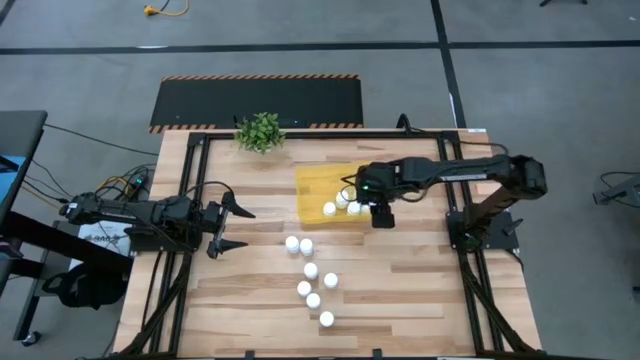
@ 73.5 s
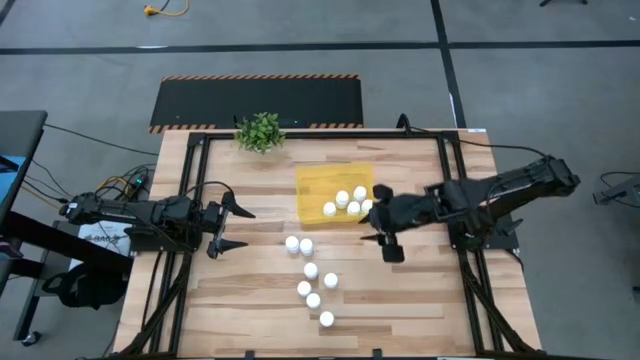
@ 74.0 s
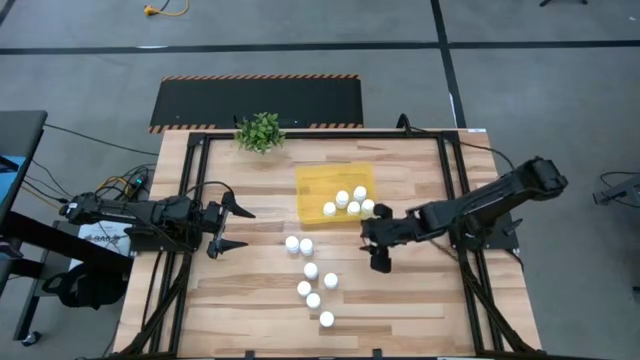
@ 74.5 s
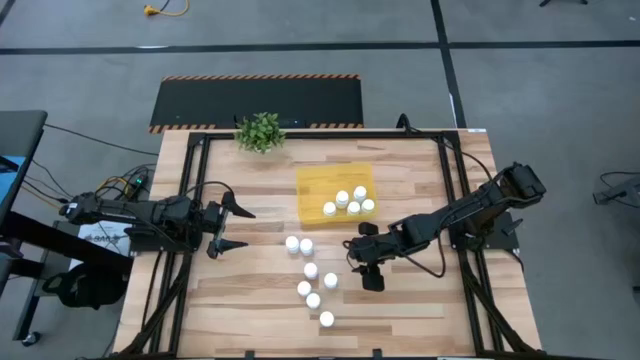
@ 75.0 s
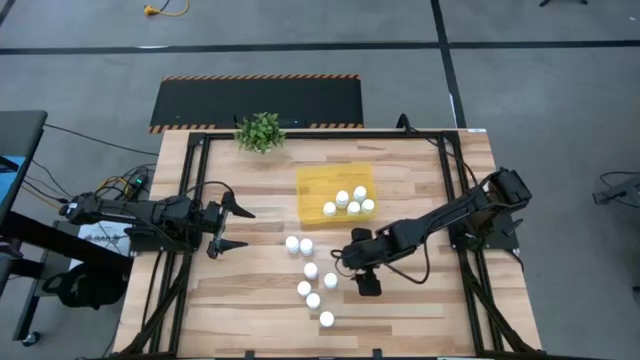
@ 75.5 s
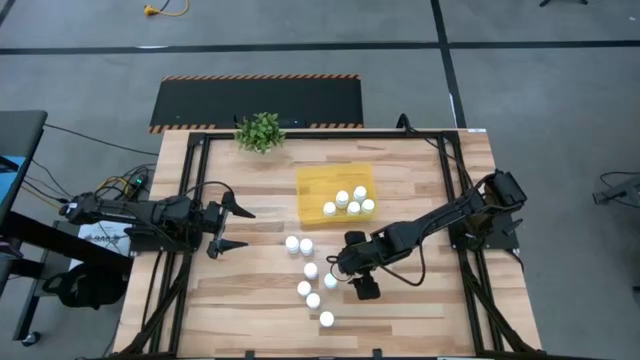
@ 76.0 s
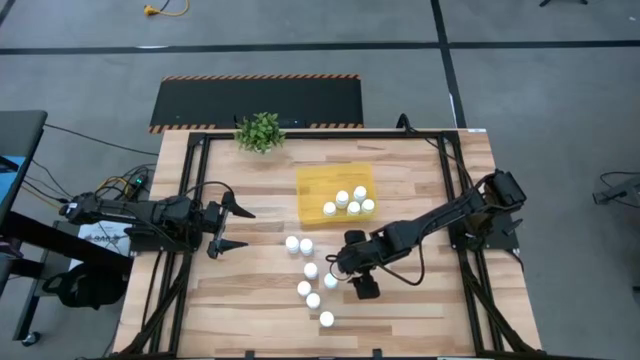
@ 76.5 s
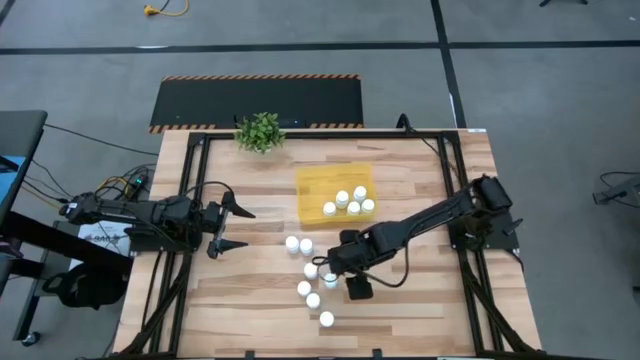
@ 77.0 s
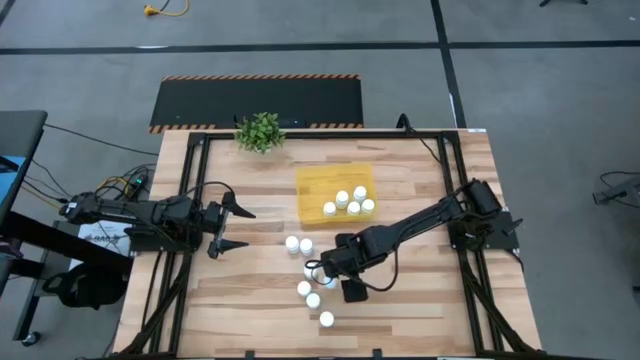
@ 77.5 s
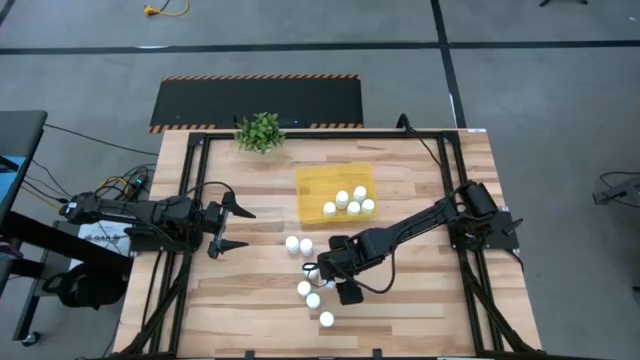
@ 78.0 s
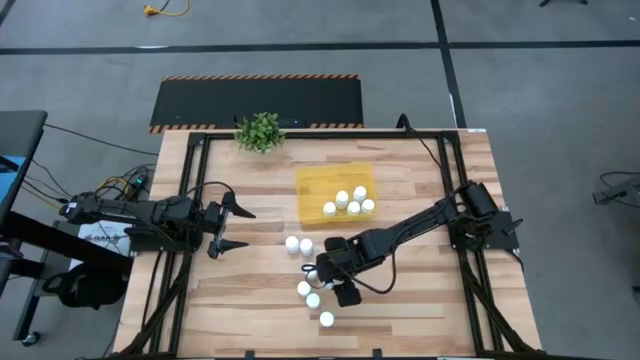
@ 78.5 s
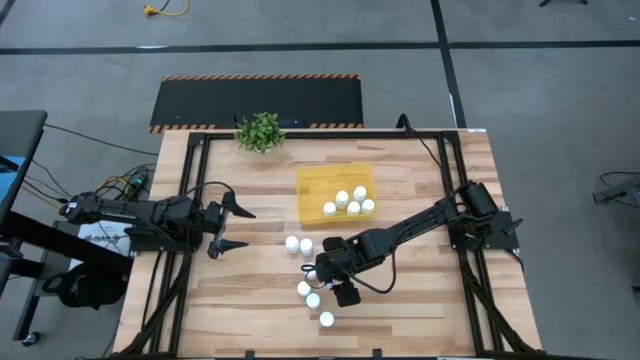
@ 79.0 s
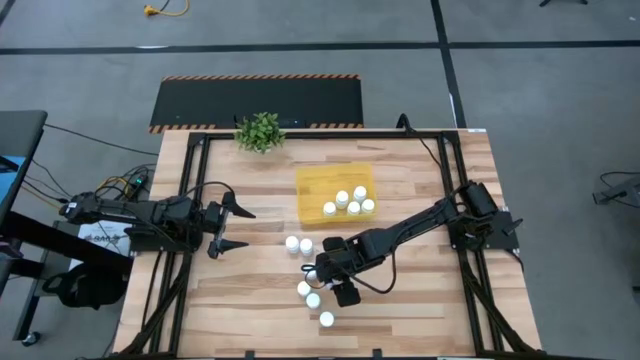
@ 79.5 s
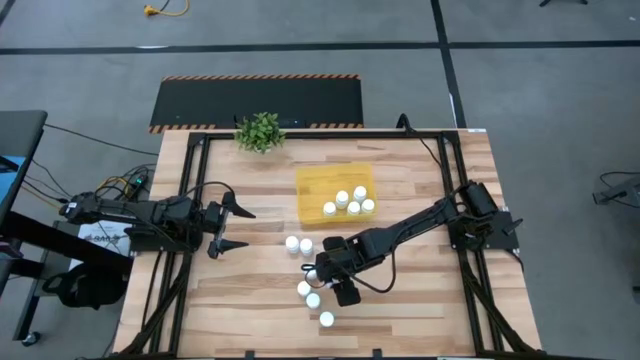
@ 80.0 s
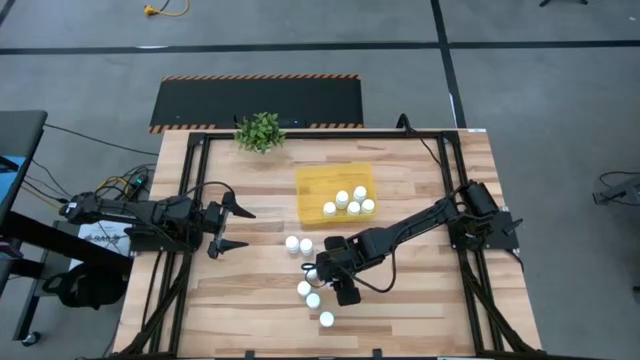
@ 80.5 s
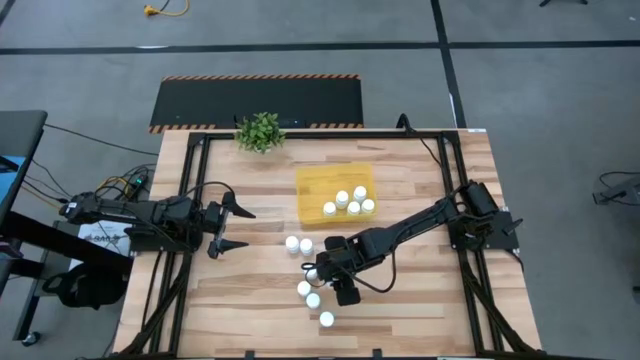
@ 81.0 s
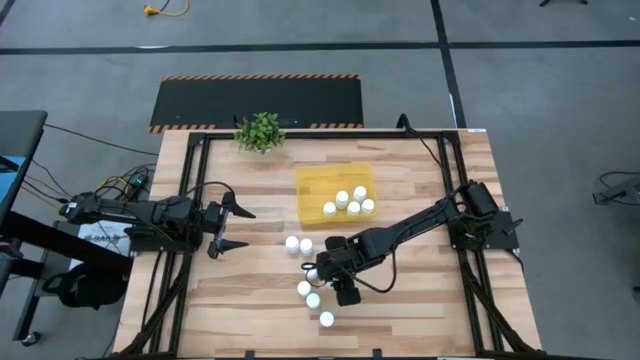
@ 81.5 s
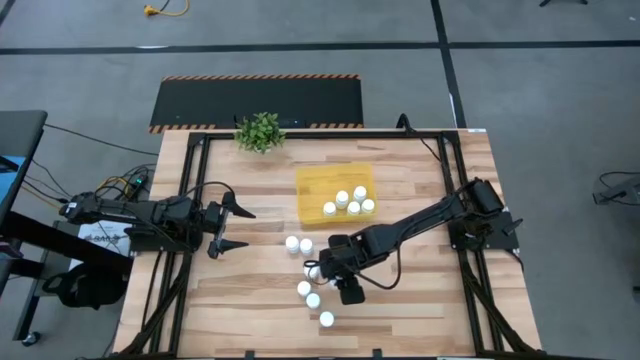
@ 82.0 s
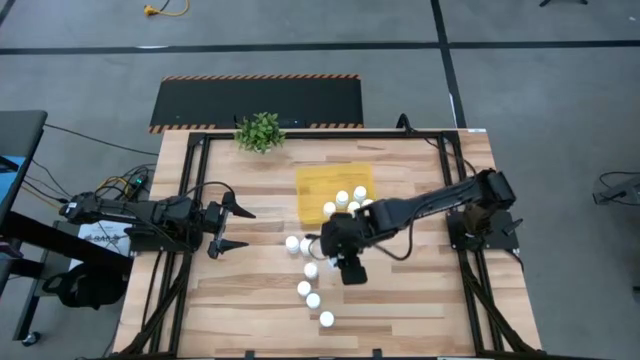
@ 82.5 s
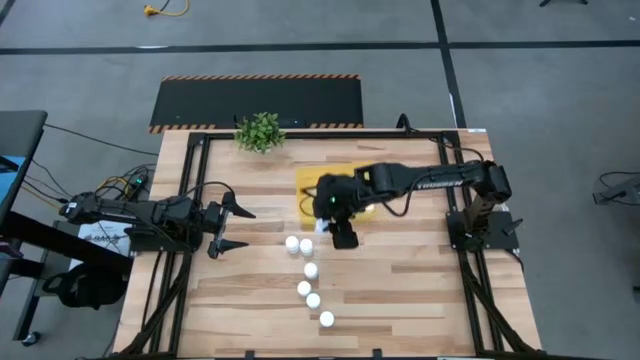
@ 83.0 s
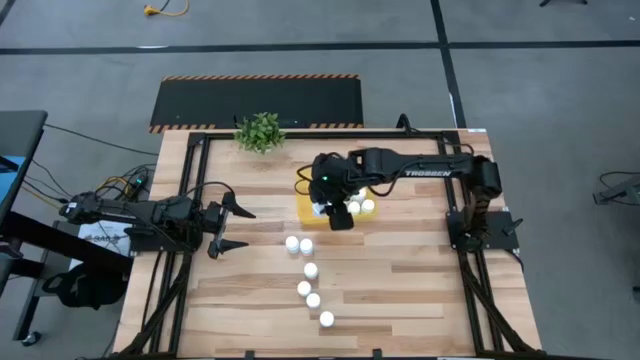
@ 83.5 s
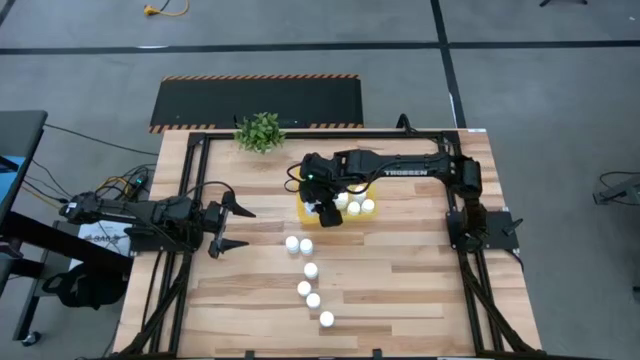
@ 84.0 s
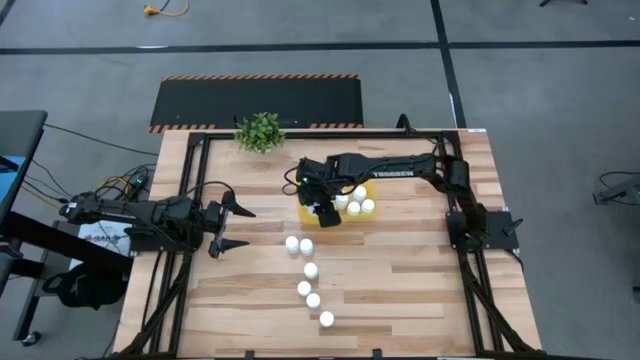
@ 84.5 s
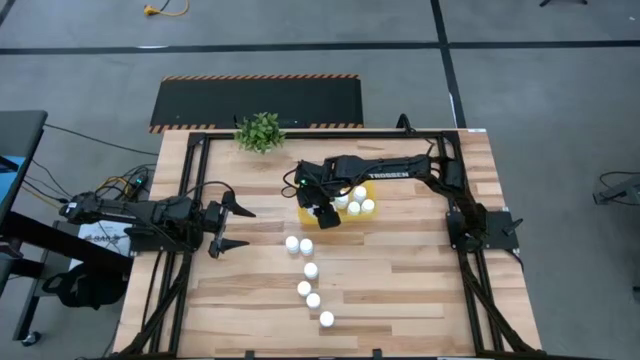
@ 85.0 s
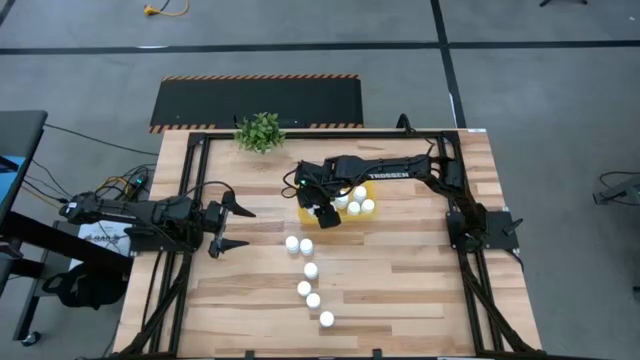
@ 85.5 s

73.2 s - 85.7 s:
Task: Pick and place pill bottles into a basket
Put the white medicine bottle into the yellow bin

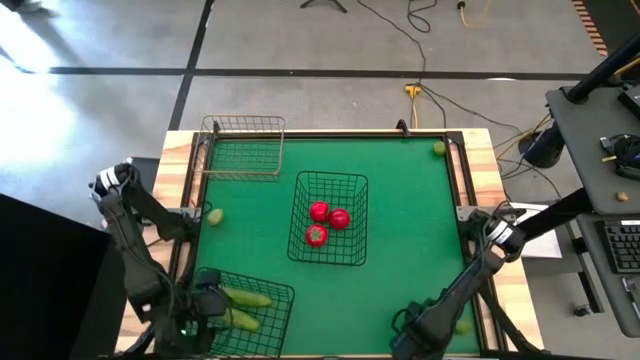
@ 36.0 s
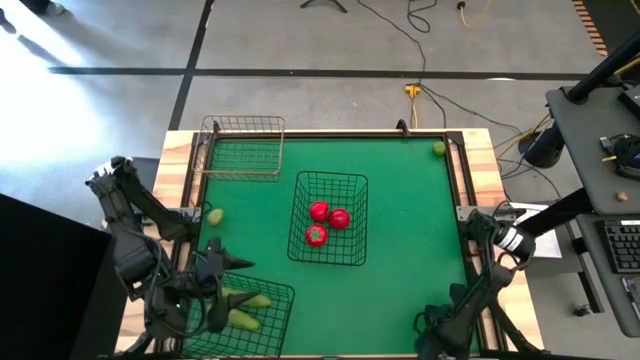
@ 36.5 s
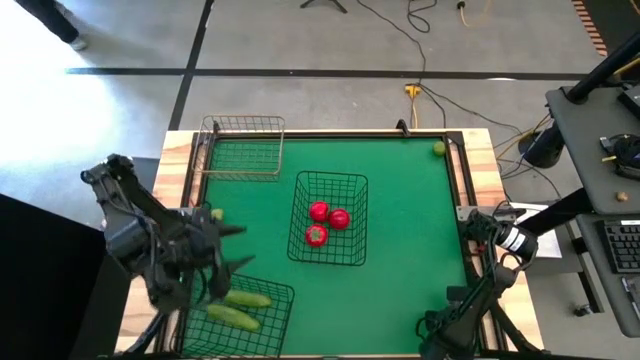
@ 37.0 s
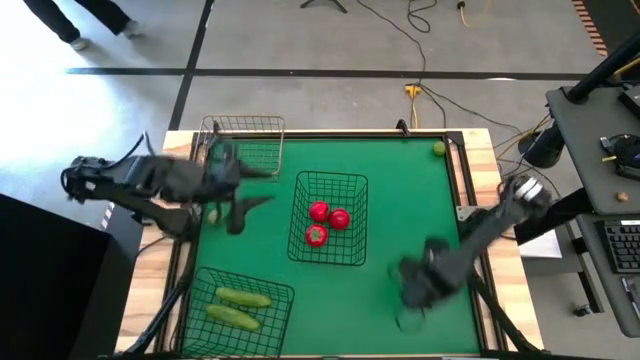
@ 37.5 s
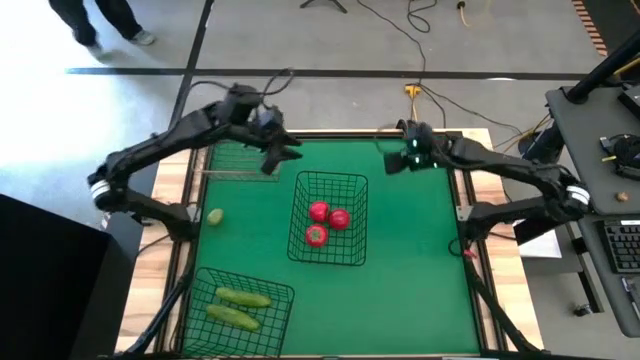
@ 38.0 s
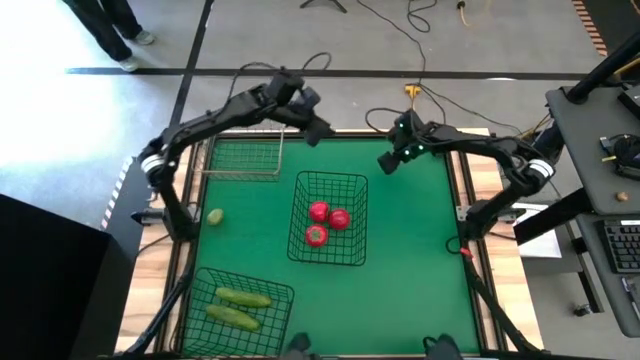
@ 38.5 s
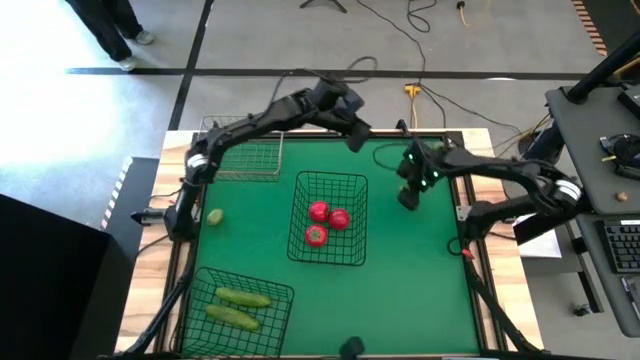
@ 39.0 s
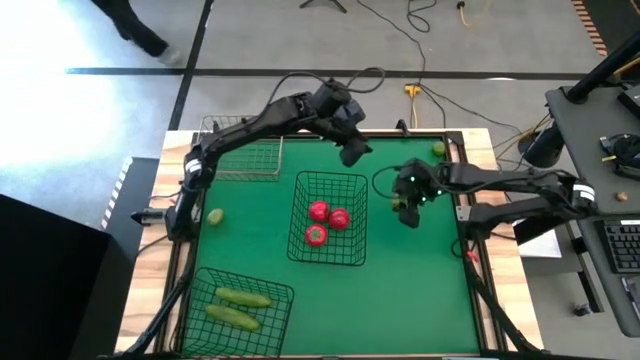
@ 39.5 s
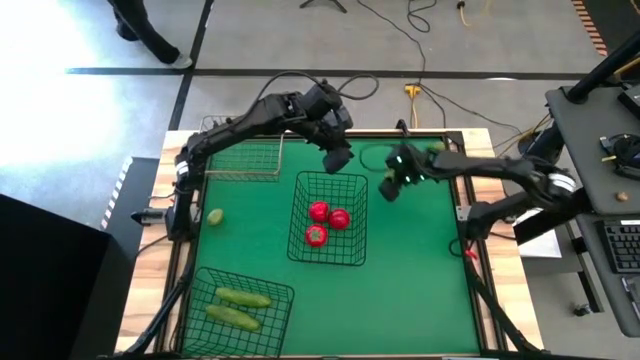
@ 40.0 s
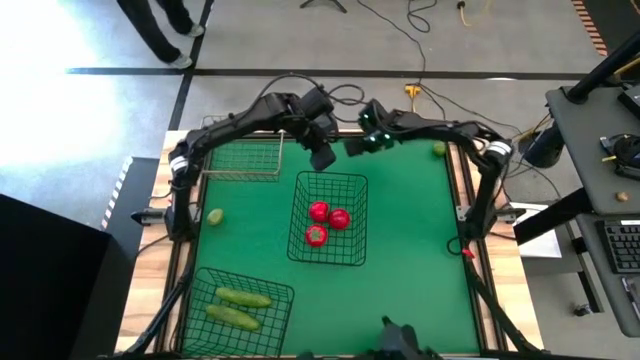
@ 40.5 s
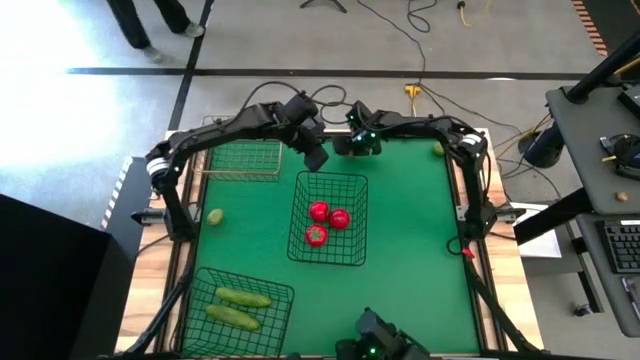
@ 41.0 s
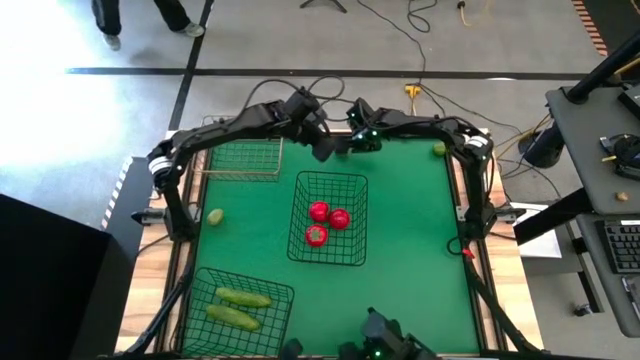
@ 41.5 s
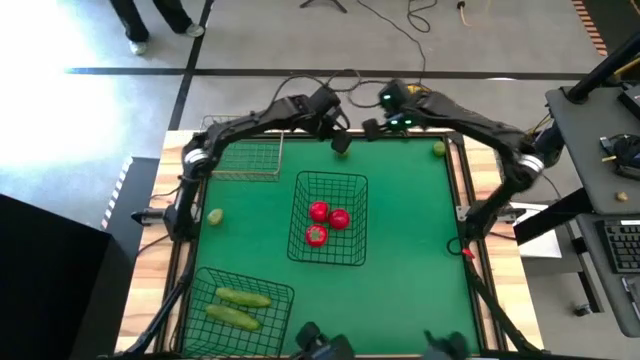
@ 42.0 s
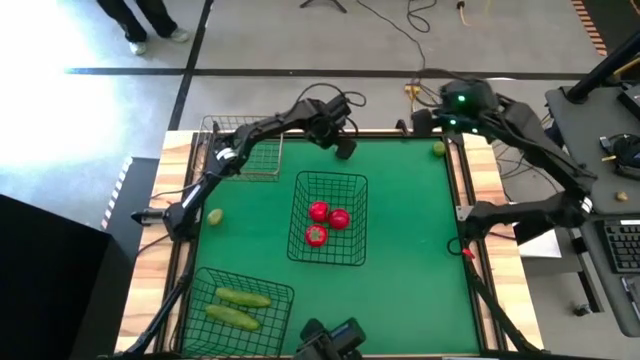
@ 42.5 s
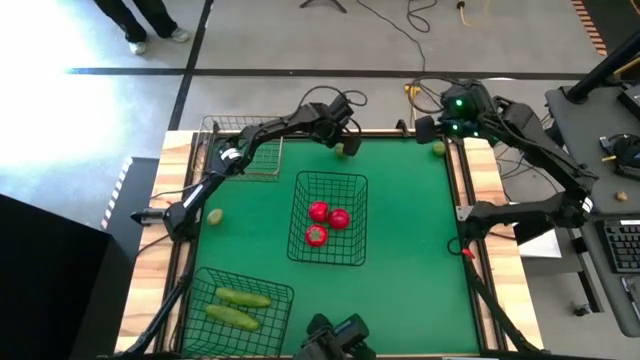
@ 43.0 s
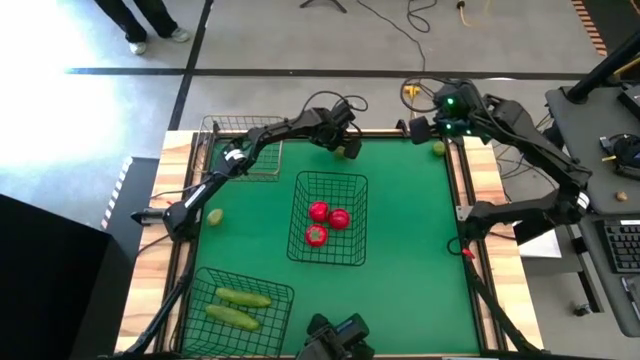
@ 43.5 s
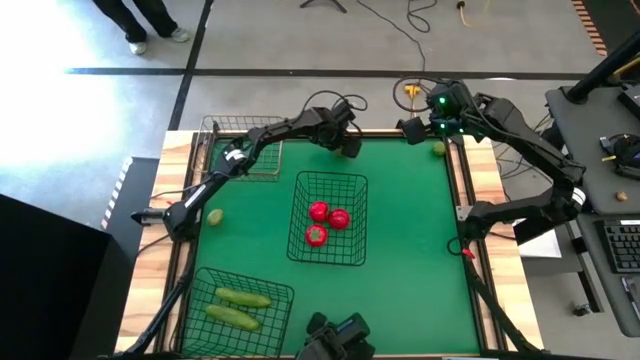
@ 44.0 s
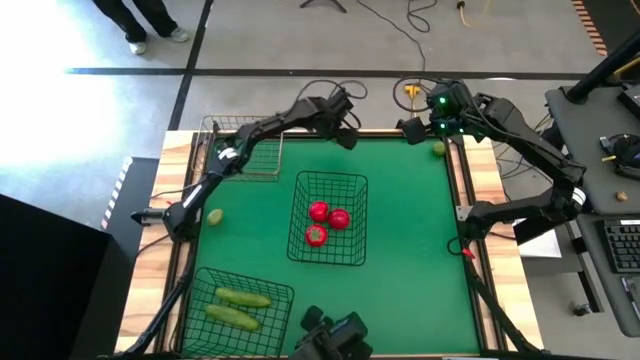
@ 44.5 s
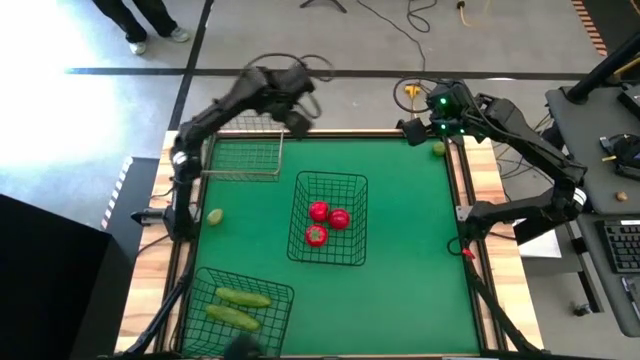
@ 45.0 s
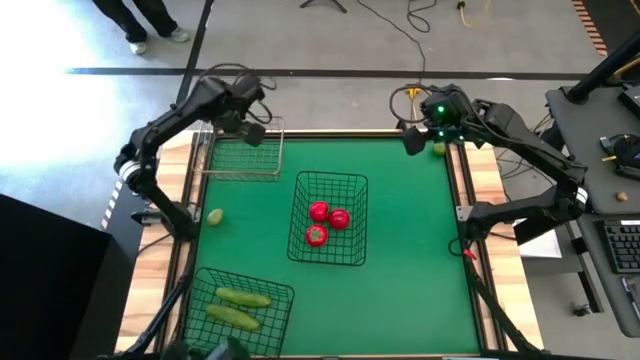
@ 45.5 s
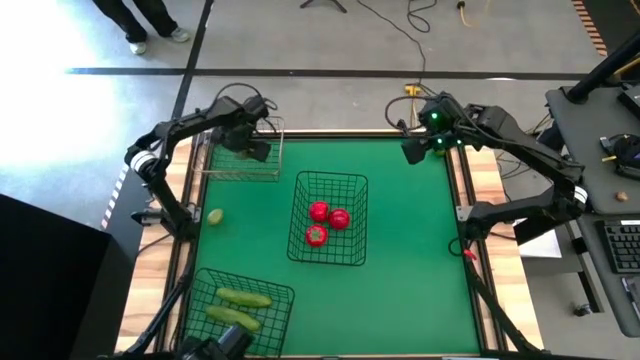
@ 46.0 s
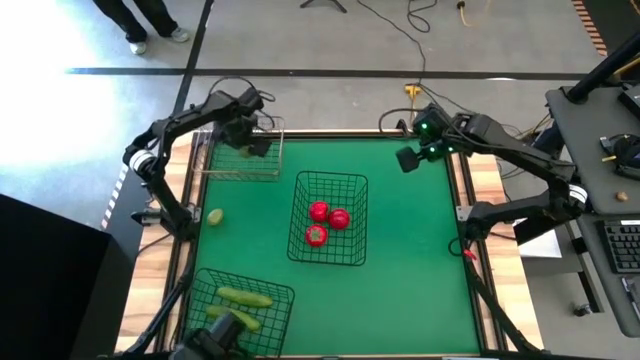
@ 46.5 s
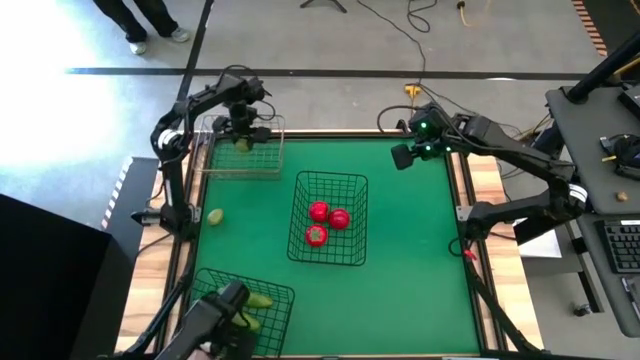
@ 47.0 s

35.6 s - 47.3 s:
Task: Sort produce into baskets
Put the bottom right lime into the gold wire basket
